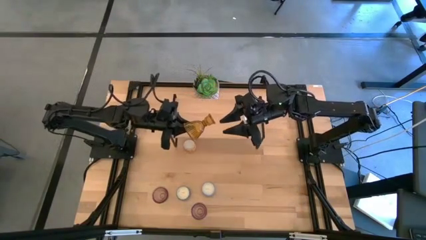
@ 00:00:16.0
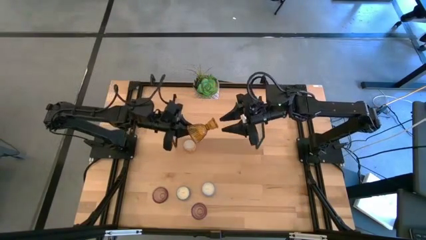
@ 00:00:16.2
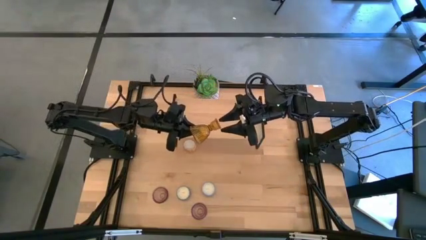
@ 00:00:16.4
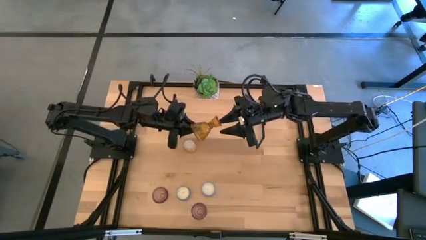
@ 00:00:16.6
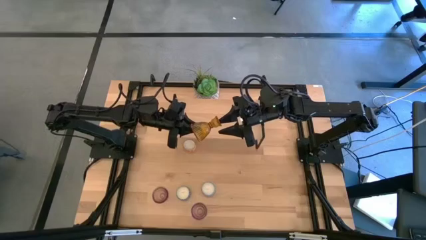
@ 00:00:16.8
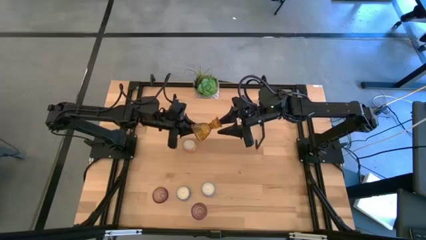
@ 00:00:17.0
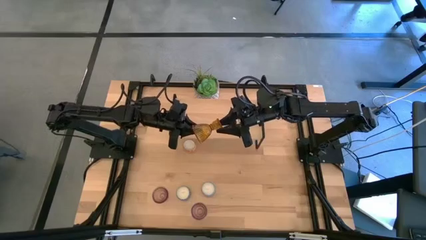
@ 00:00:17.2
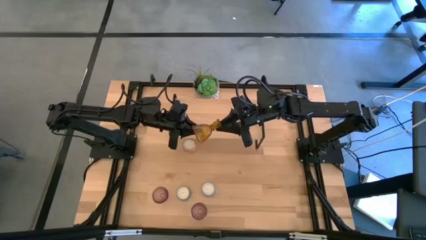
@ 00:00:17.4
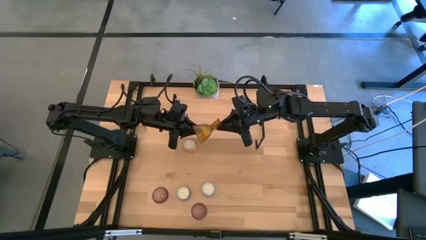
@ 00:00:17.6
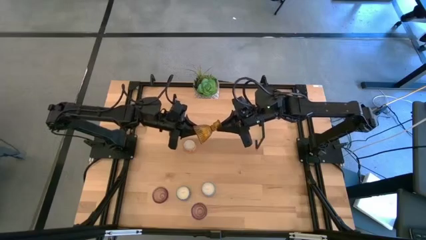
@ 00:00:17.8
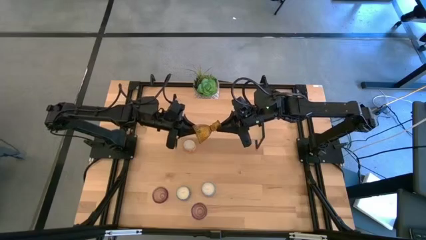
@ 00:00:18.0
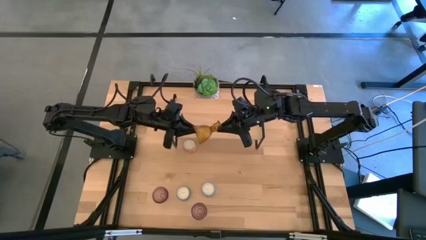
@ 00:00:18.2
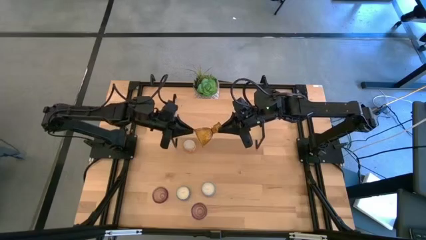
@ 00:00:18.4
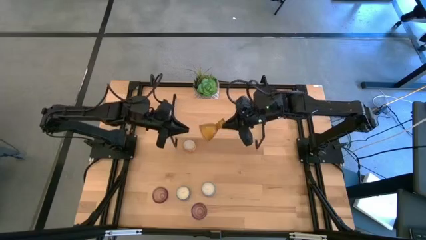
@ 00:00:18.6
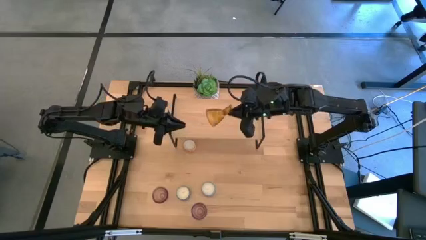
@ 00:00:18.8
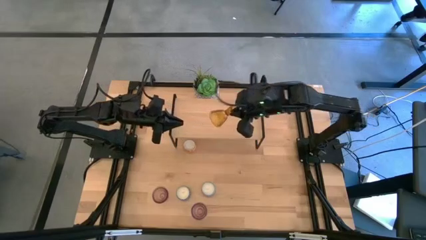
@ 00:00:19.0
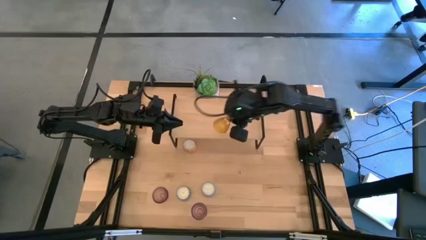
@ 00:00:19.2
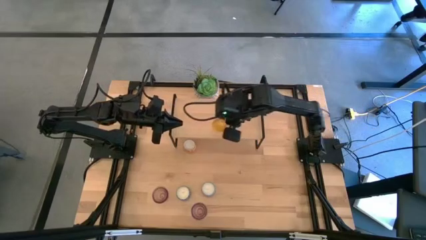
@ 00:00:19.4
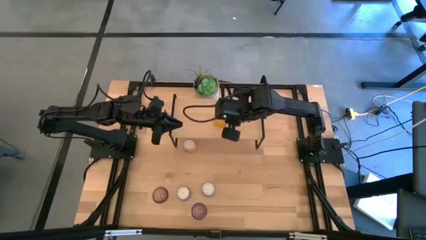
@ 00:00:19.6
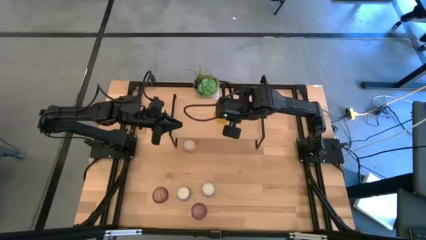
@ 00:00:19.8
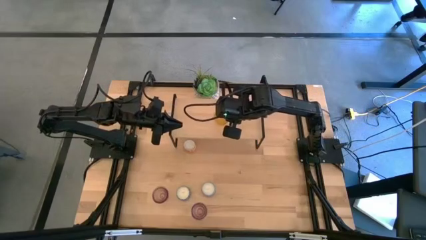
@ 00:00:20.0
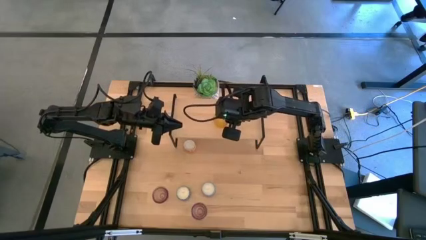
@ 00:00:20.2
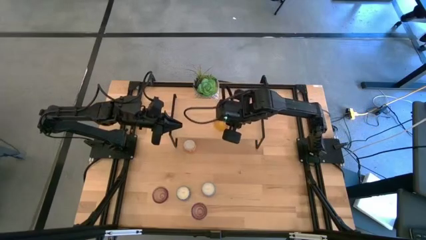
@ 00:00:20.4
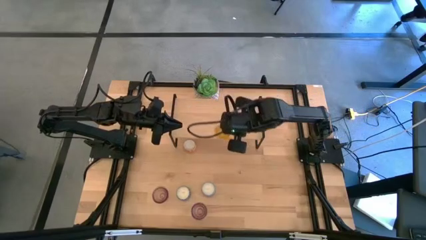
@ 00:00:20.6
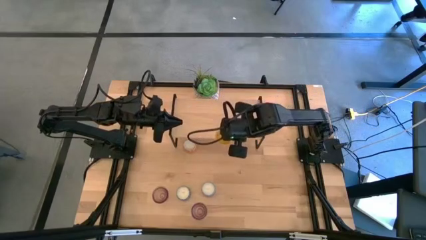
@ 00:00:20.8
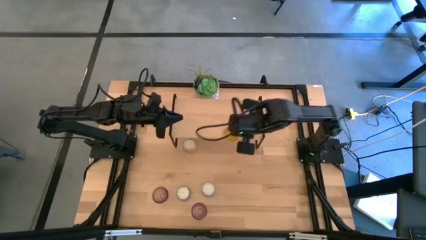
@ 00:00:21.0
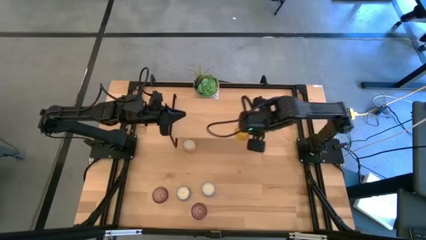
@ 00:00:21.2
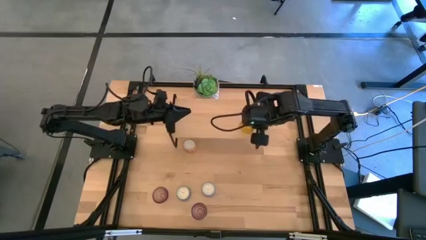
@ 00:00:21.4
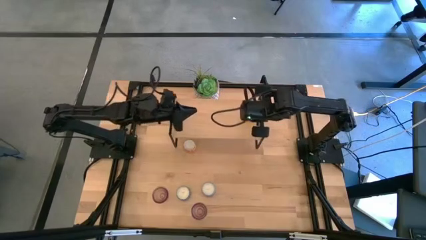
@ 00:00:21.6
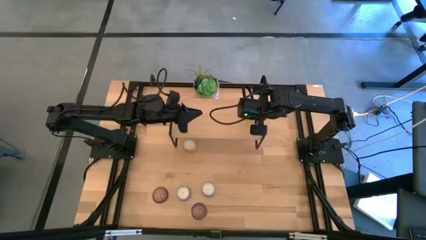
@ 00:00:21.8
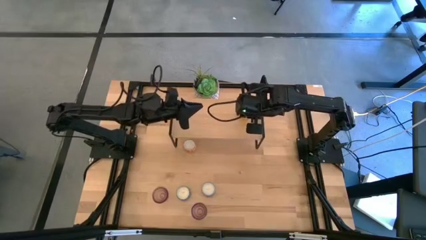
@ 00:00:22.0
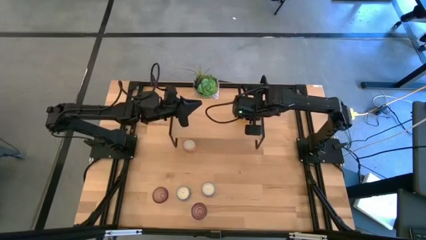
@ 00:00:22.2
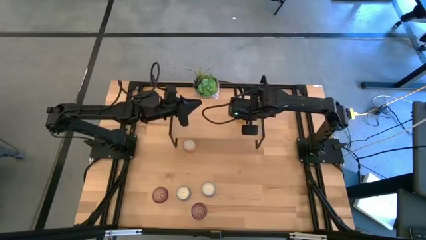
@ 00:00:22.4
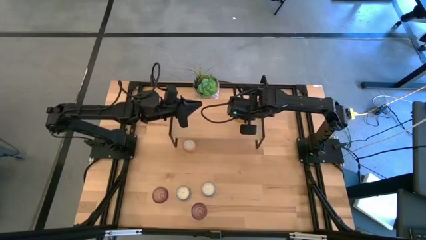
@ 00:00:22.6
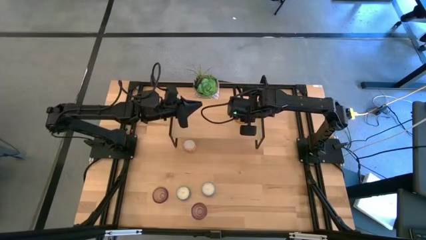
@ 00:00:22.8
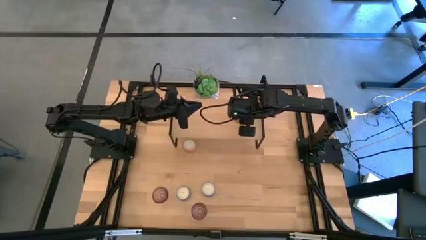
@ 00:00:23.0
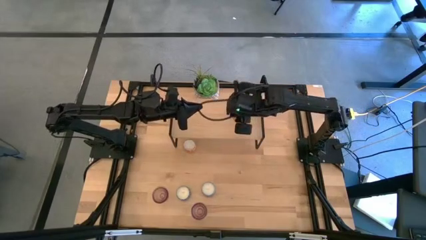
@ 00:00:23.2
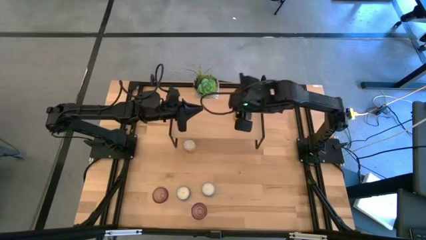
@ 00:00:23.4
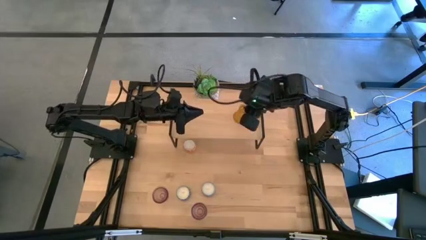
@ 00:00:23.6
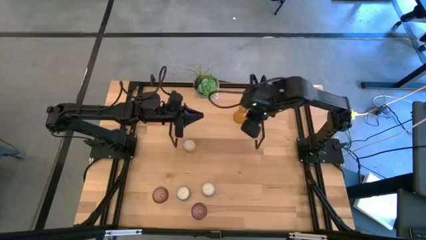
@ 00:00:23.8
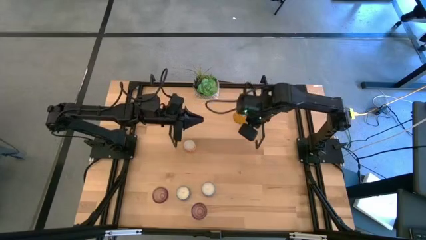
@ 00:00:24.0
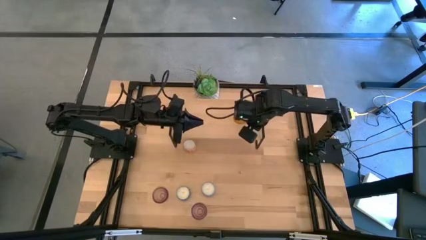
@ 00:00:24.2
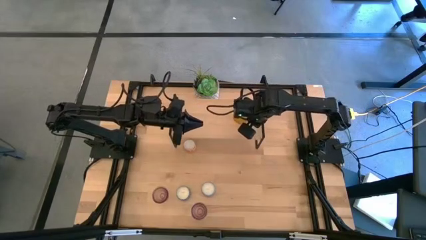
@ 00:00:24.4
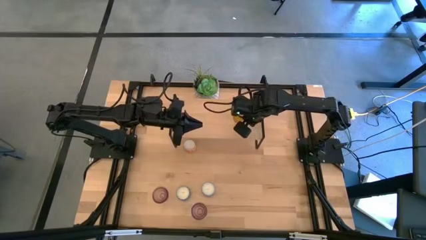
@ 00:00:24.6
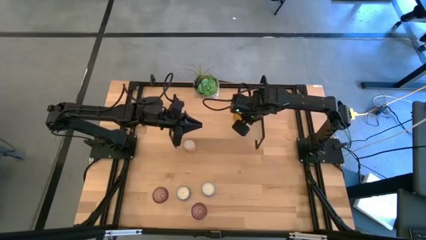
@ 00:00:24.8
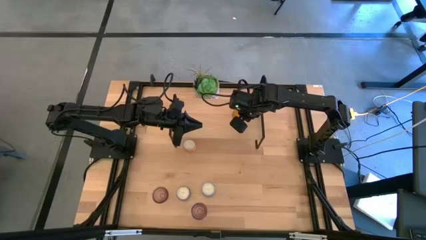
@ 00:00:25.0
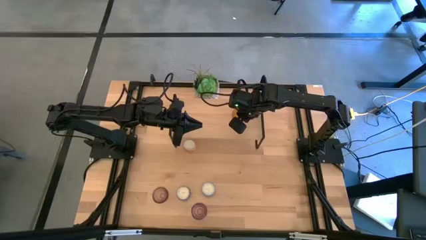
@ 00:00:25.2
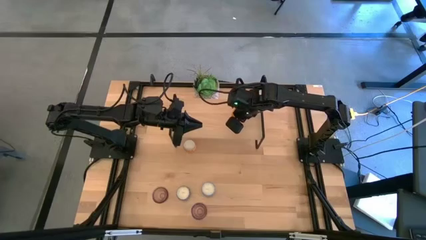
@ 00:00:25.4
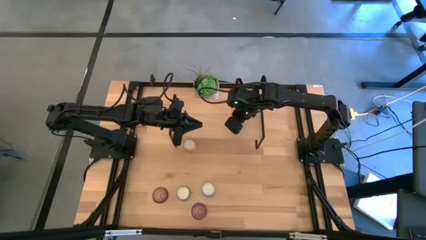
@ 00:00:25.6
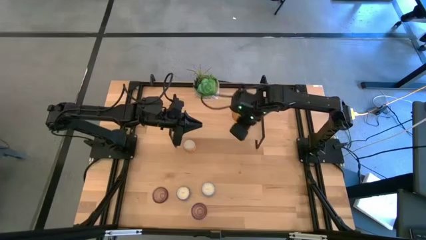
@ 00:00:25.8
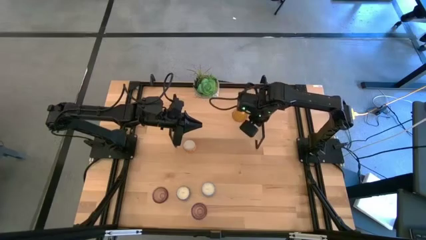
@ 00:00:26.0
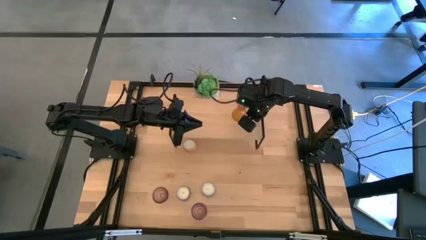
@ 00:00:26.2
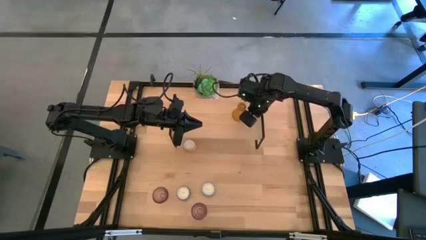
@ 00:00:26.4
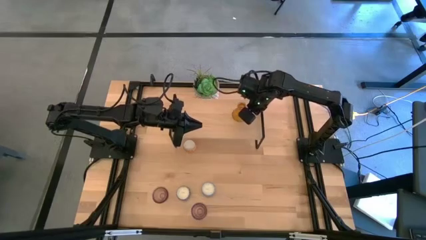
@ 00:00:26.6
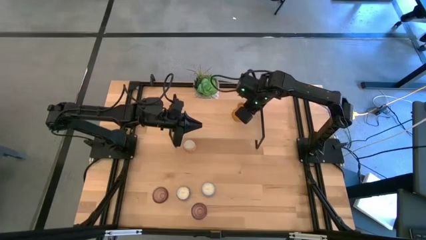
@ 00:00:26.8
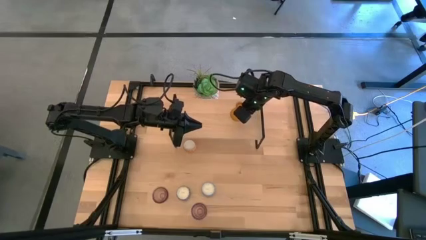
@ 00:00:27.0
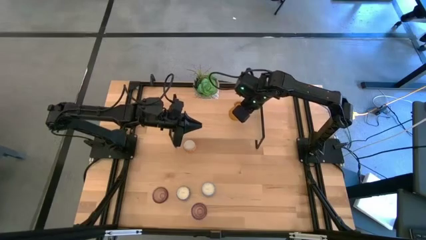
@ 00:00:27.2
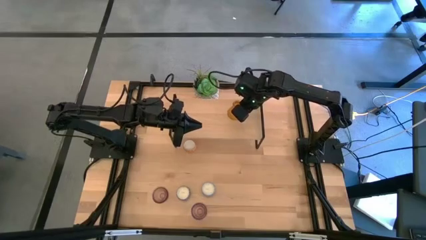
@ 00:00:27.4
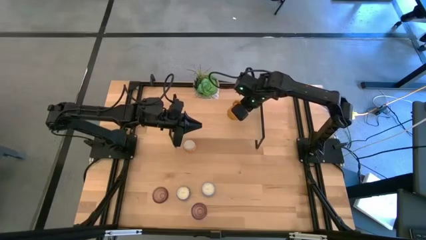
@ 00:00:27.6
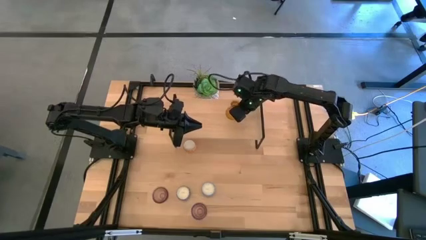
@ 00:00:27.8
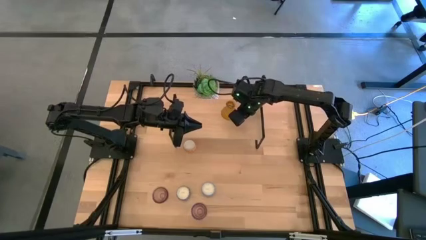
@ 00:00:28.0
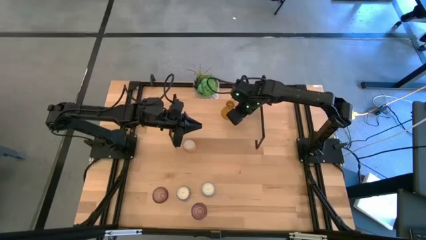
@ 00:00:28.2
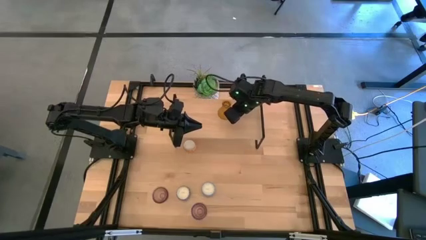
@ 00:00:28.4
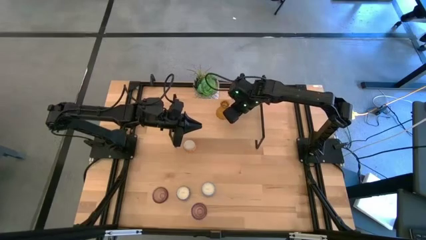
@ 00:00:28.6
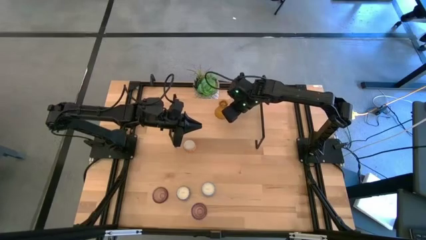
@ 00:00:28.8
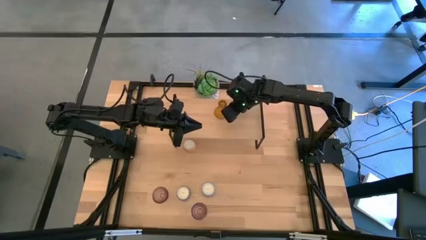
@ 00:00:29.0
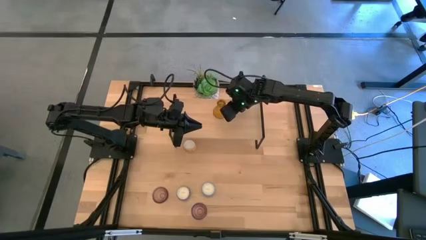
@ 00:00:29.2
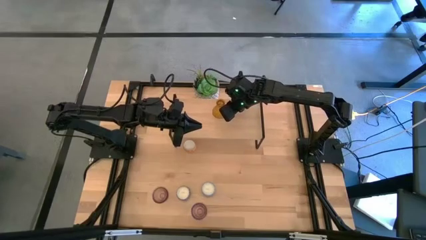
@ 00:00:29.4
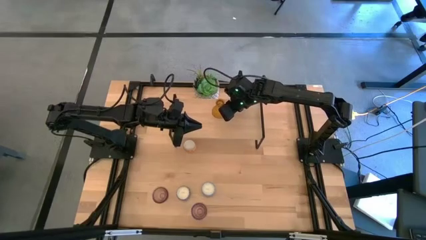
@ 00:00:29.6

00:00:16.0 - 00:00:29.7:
Task: Pick & Place candle stick holders
Put the orange candle holder on the shelf
